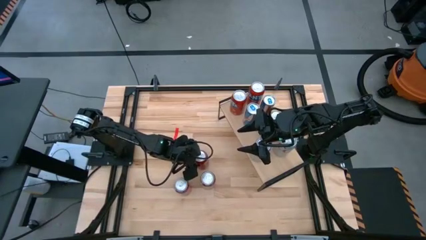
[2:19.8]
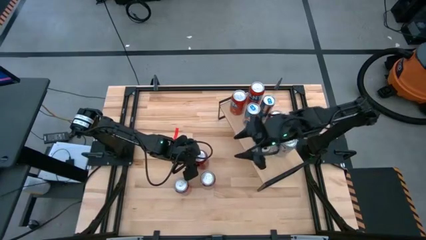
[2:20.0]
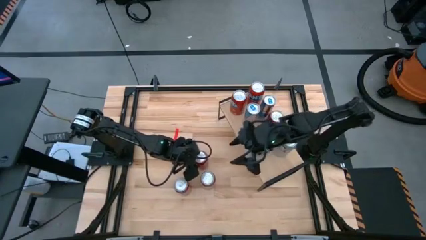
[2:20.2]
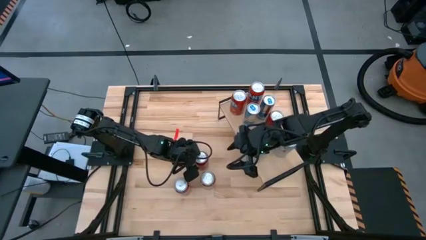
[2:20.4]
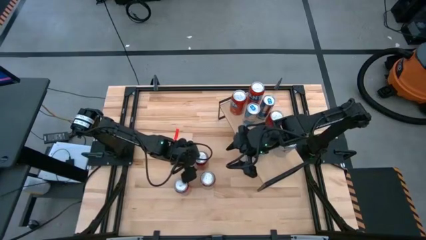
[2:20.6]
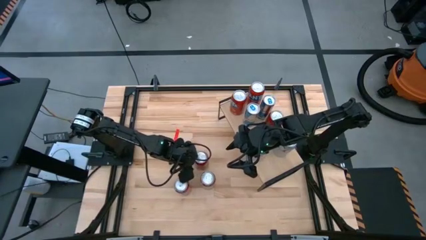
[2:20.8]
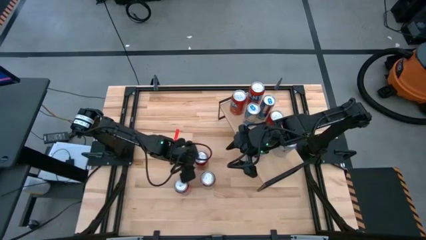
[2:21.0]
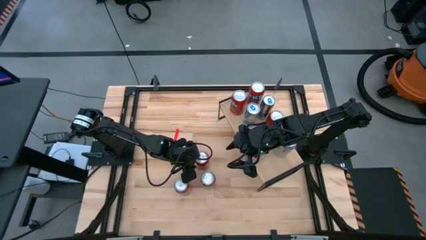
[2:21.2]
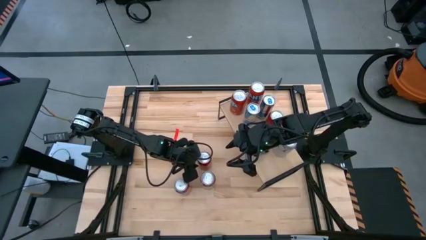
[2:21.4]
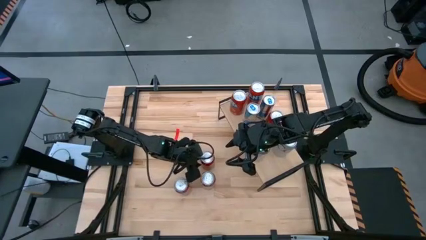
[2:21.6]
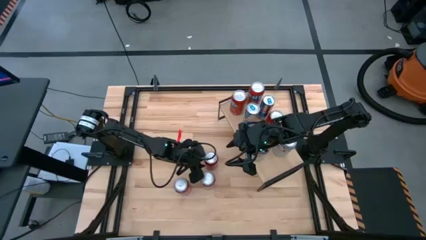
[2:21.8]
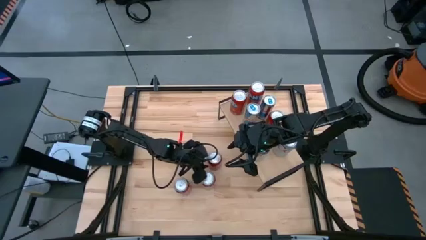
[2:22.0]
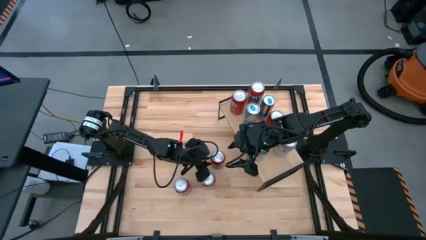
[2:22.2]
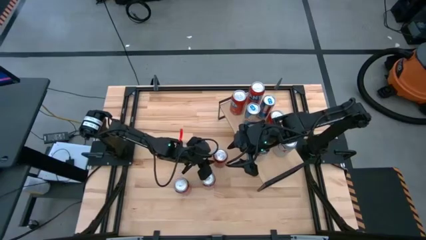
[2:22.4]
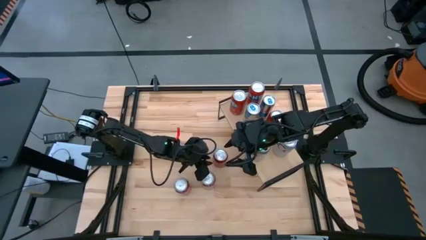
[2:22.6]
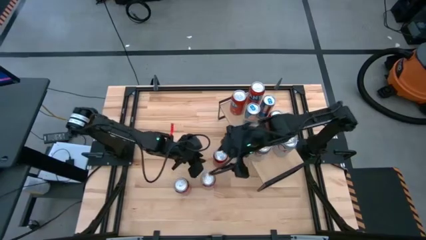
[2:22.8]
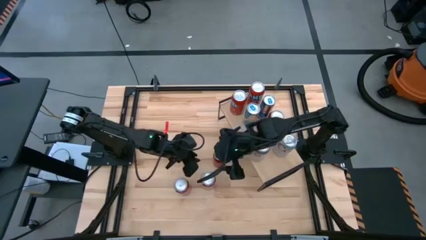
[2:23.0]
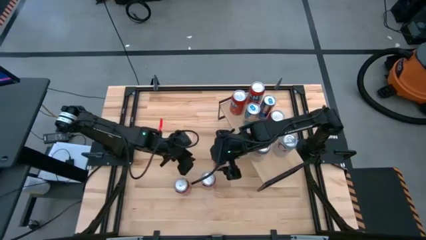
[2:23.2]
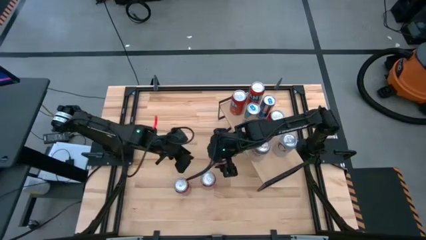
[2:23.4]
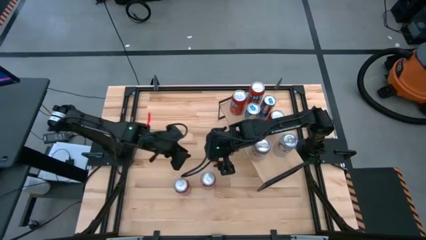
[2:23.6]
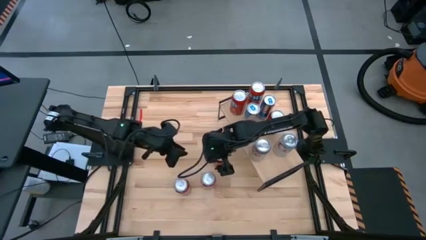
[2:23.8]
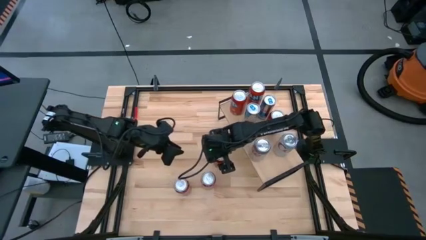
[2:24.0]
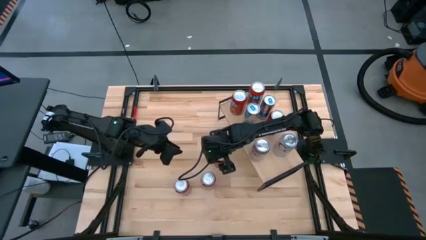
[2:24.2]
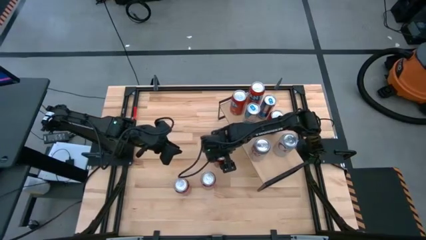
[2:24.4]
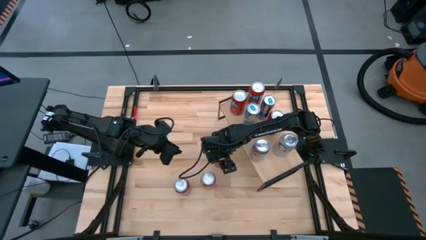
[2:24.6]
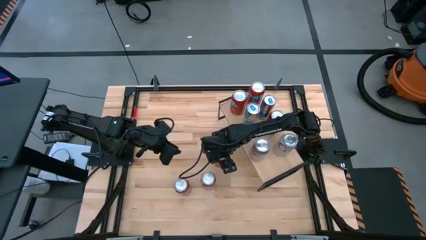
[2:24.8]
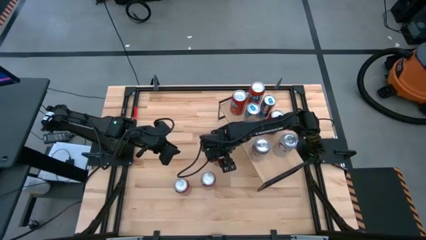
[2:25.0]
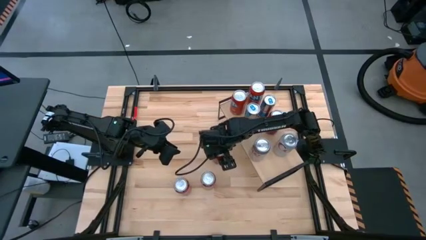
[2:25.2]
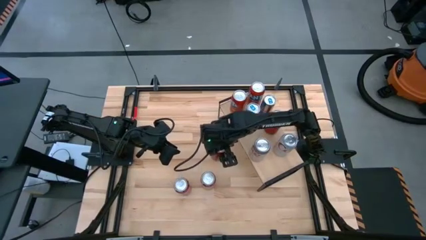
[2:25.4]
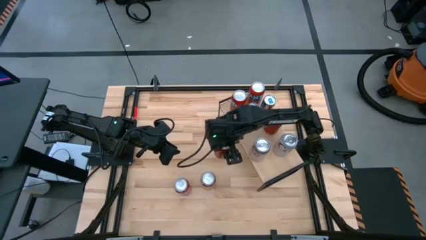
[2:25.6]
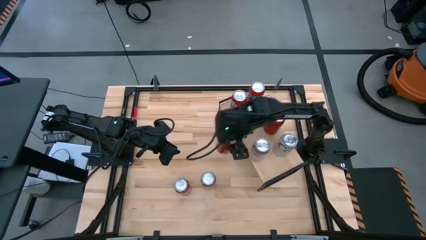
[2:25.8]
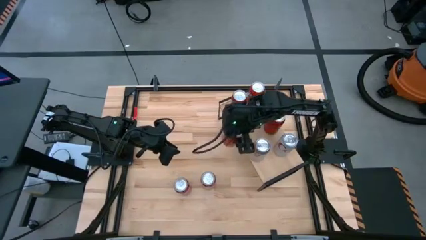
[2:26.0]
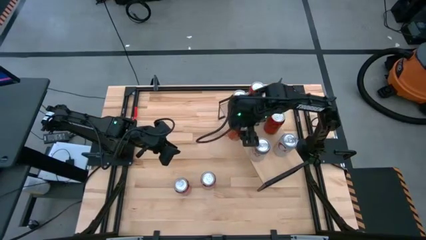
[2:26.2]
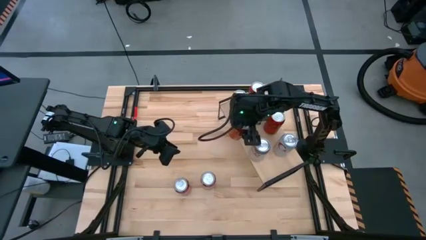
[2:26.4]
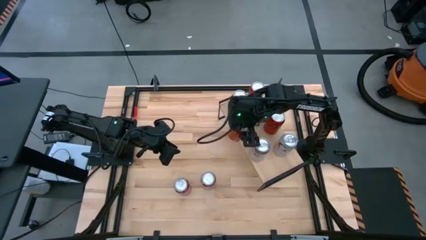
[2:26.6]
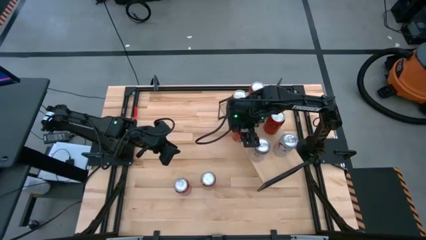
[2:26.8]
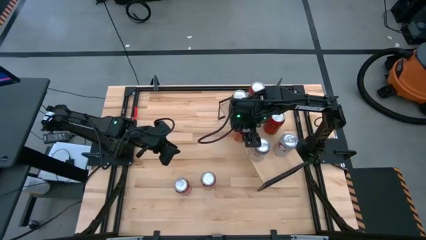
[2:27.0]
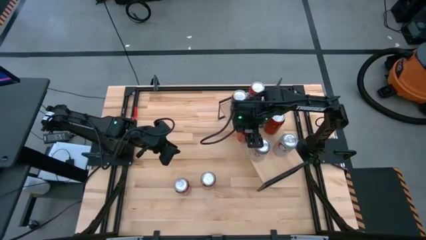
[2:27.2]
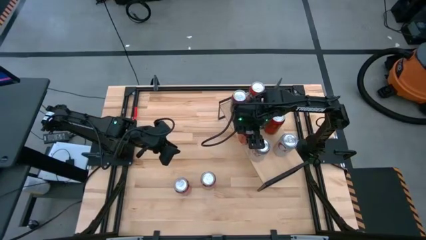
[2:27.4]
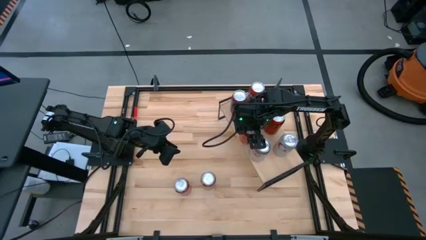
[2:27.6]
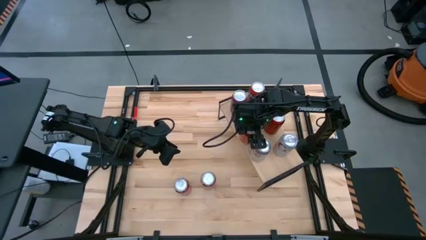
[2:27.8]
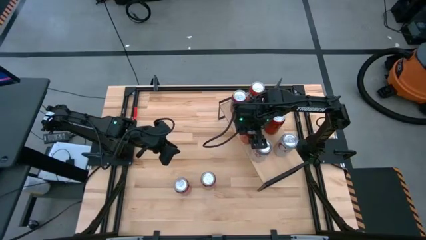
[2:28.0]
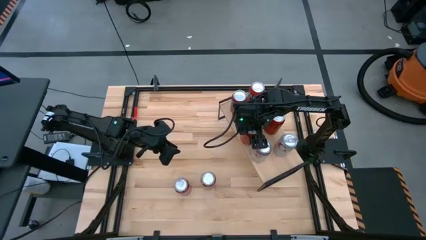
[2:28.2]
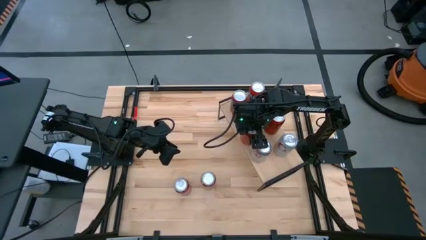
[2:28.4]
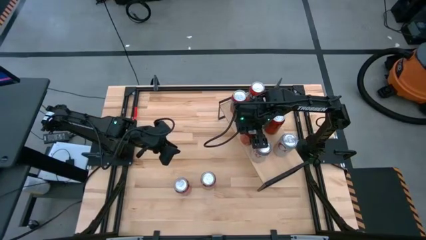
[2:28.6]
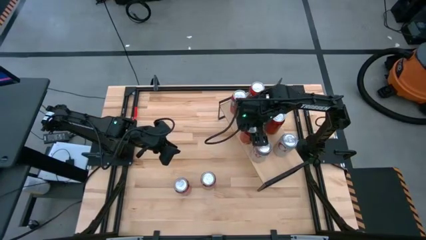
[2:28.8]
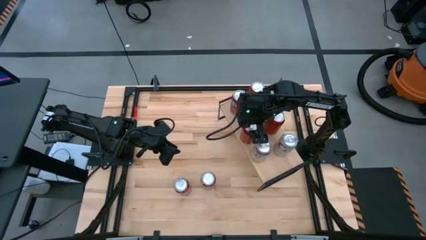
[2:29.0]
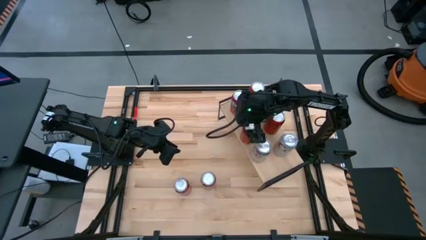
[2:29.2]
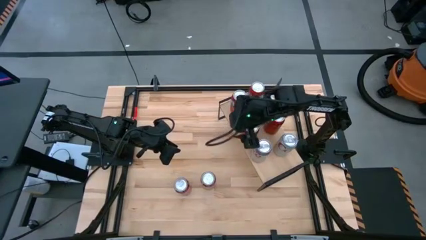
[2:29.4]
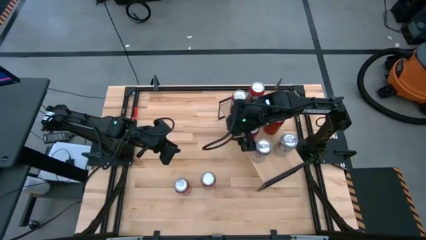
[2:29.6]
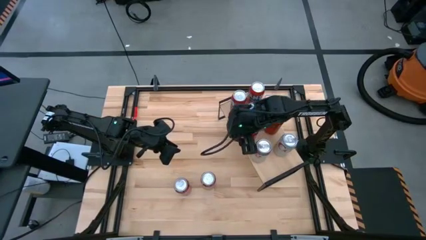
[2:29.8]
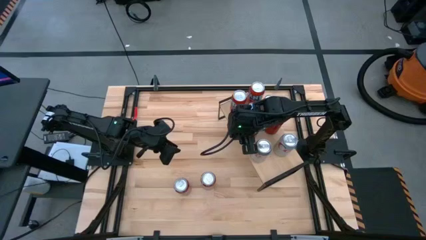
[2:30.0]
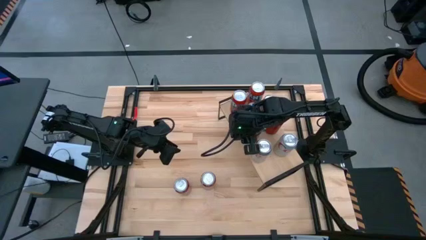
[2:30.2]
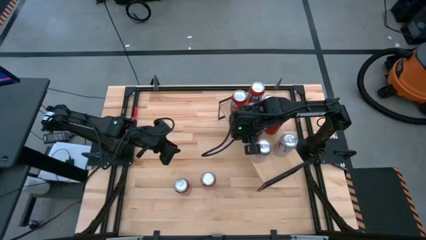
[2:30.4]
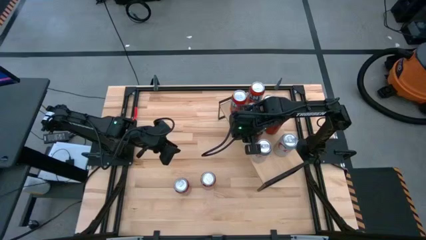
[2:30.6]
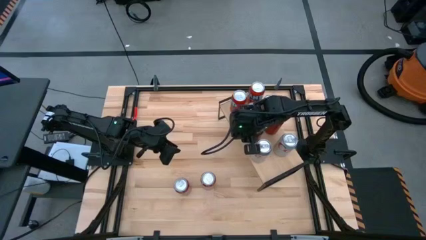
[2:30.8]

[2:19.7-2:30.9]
Task: Place canned beverage on shelf
Put the dark red soda can aligned with the other dark red soda can on the shelf

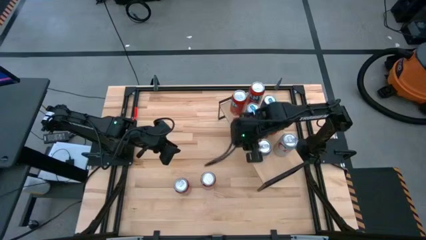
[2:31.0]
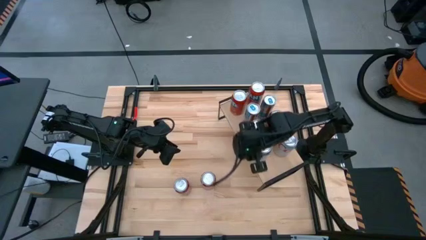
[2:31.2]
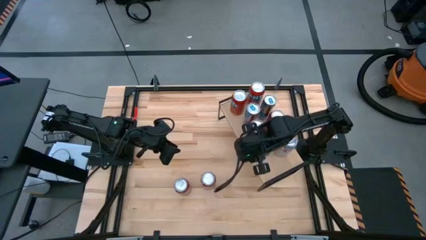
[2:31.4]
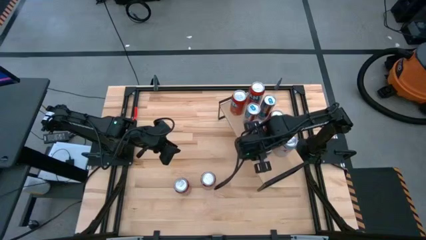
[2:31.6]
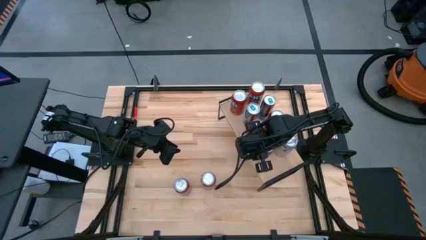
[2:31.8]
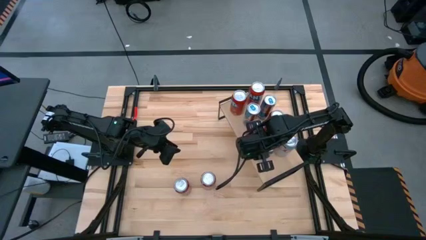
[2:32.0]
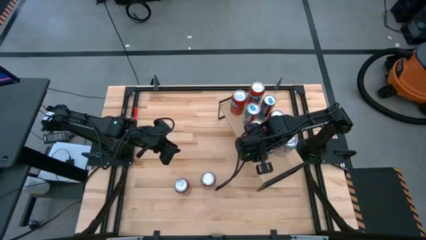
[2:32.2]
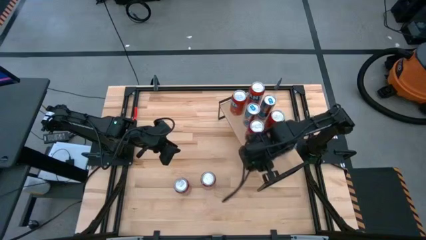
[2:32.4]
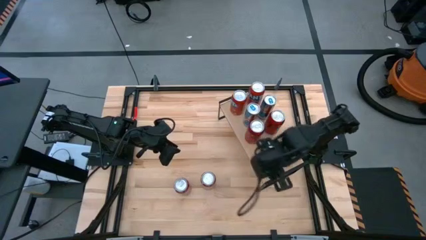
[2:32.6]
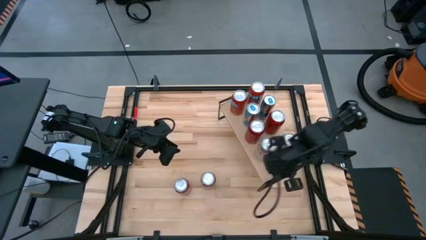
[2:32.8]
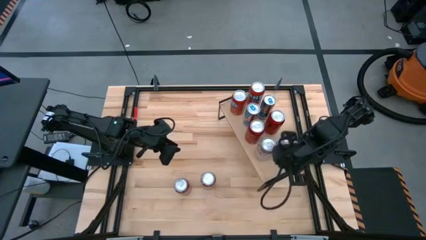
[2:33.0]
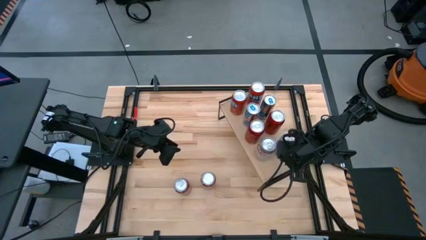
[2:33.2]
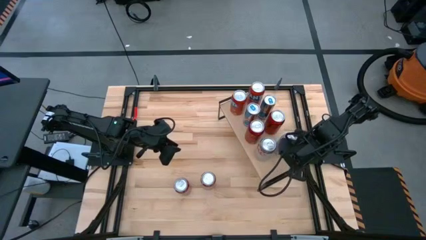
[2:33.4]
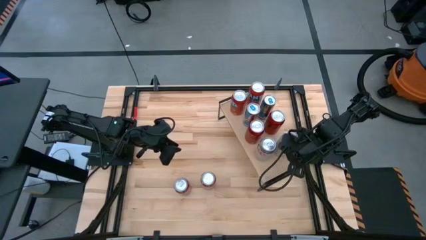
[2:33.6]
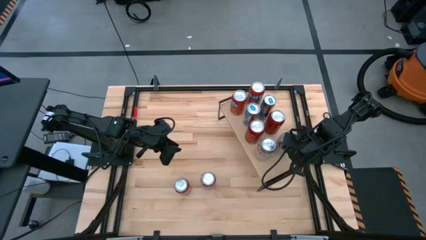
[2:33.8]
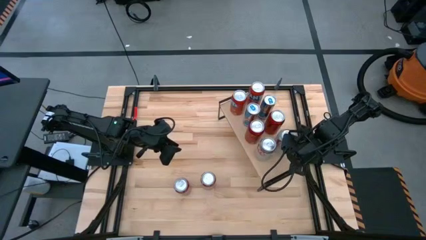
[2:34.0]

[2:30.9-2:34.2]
Adjust the white soda can on the shelf
